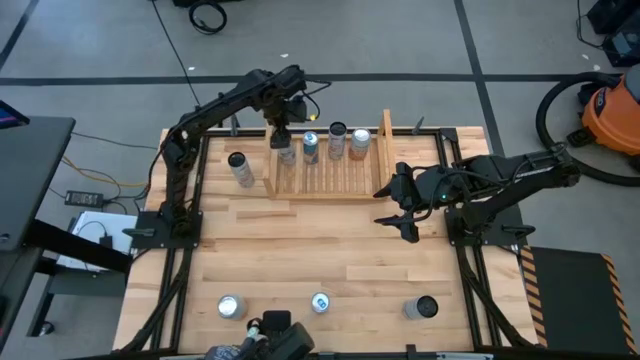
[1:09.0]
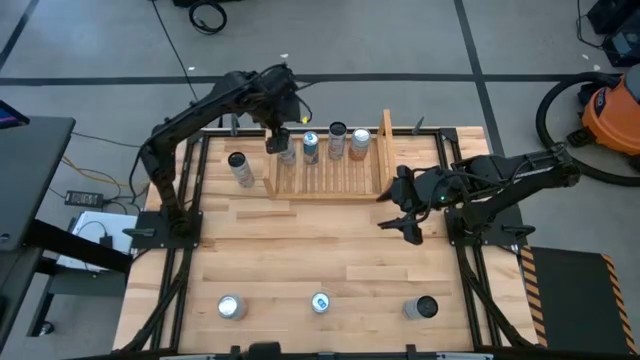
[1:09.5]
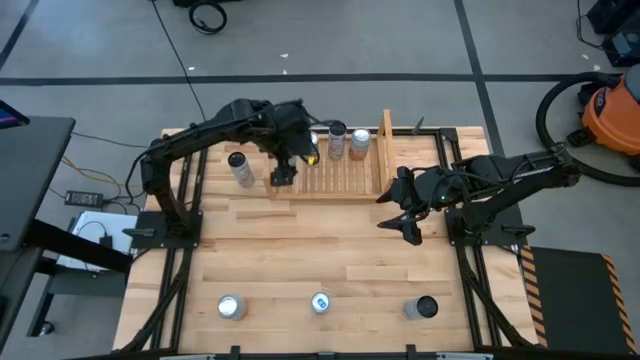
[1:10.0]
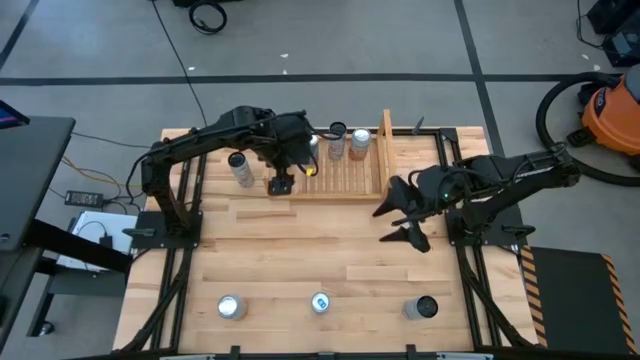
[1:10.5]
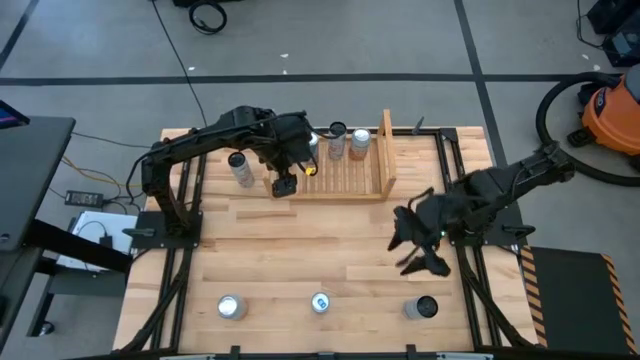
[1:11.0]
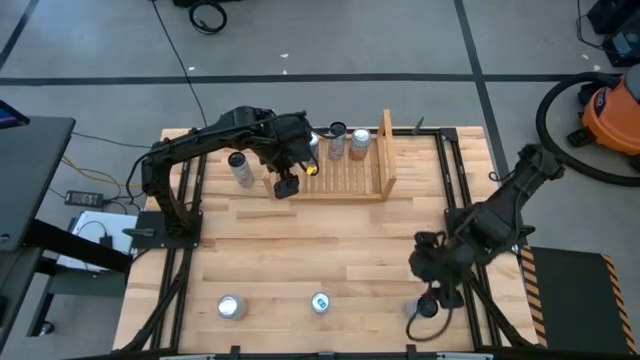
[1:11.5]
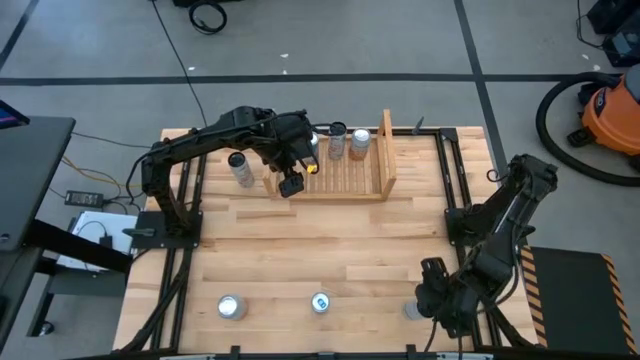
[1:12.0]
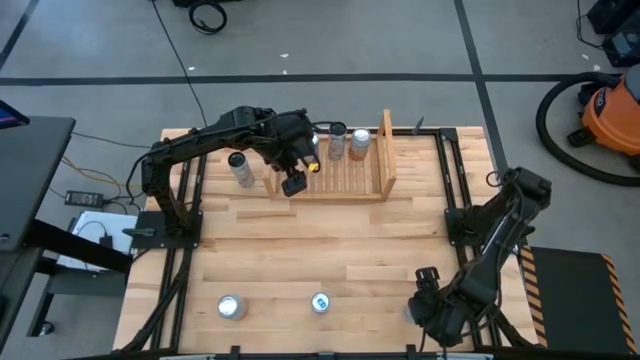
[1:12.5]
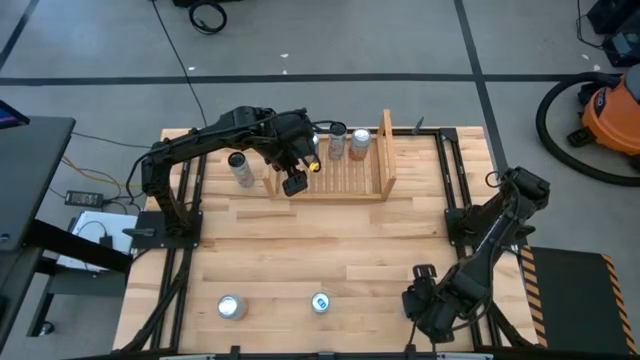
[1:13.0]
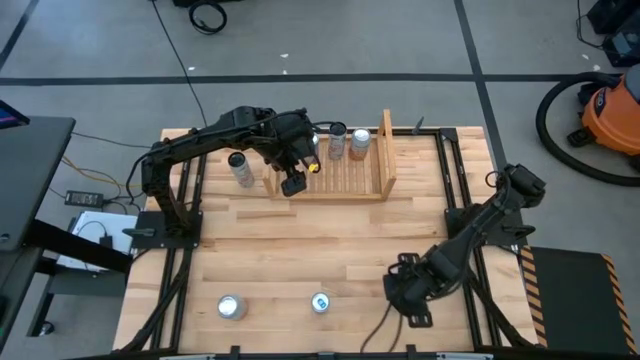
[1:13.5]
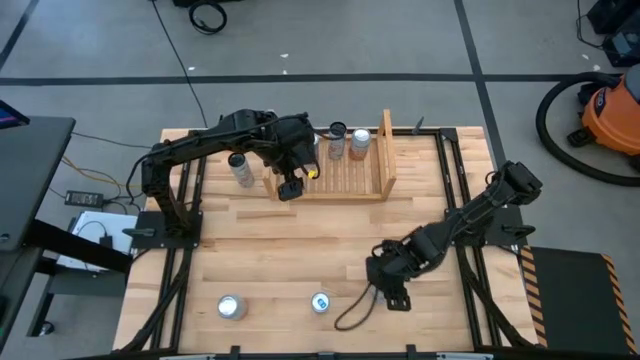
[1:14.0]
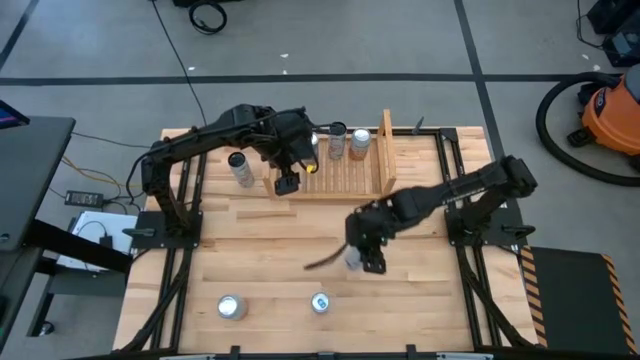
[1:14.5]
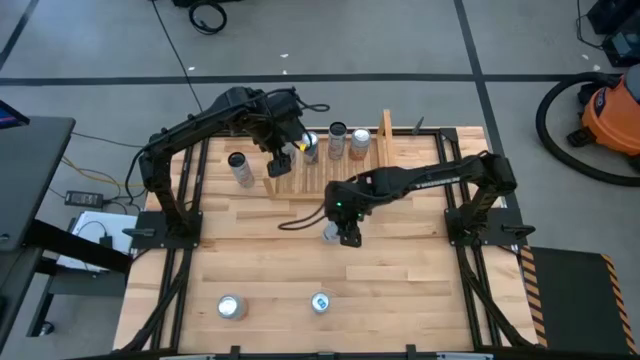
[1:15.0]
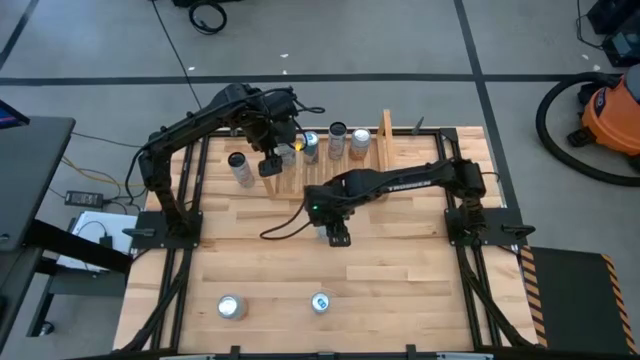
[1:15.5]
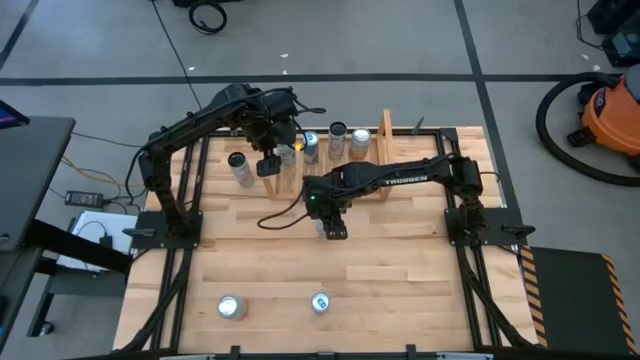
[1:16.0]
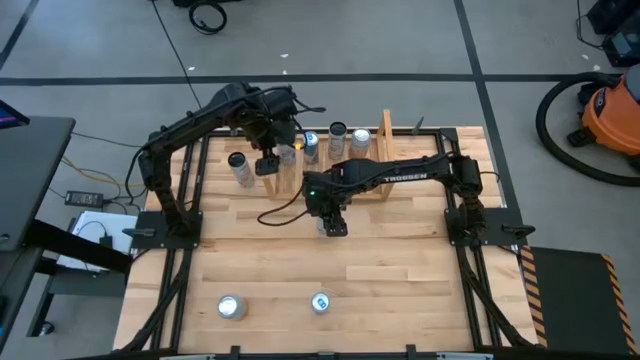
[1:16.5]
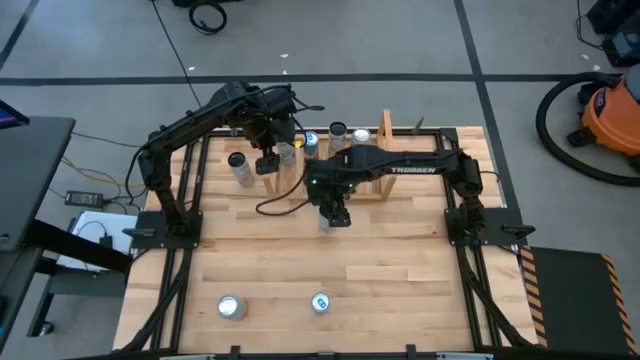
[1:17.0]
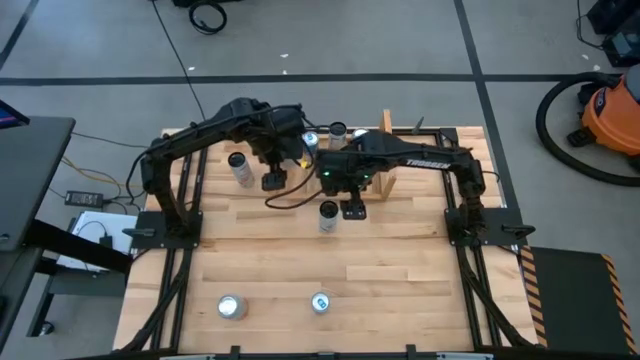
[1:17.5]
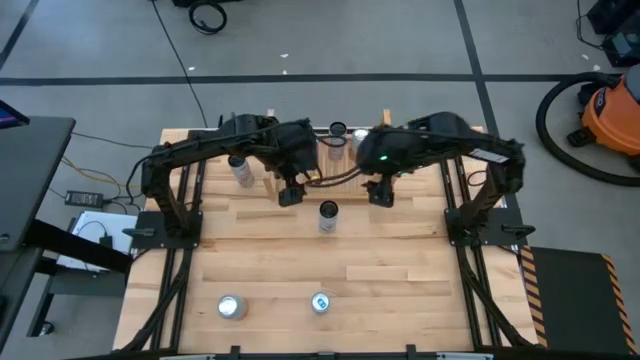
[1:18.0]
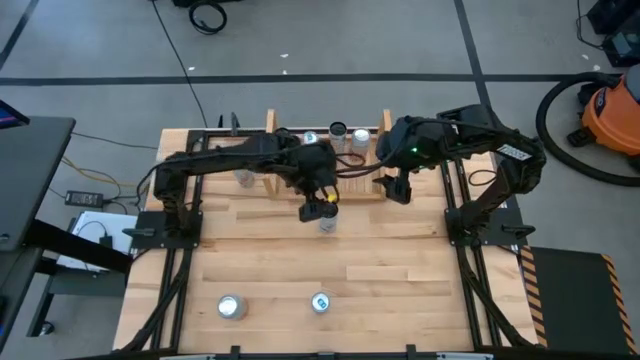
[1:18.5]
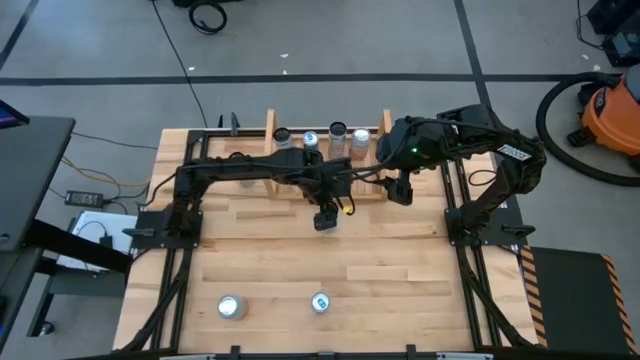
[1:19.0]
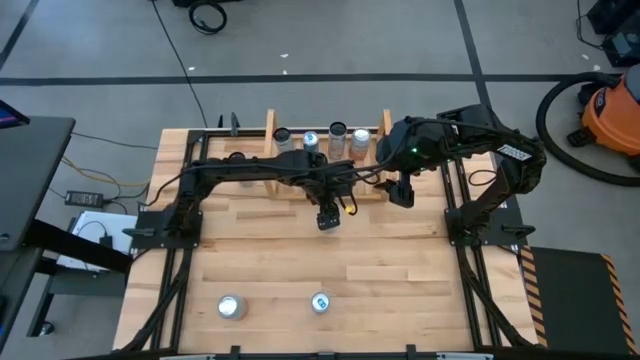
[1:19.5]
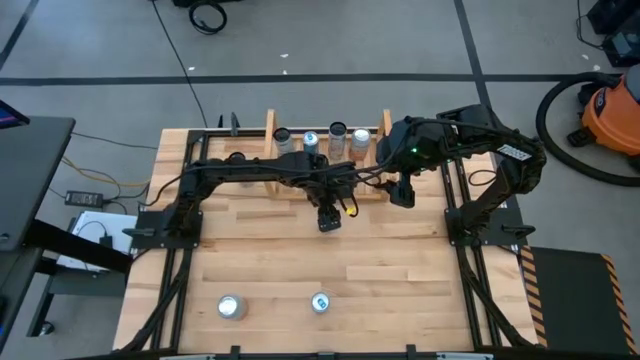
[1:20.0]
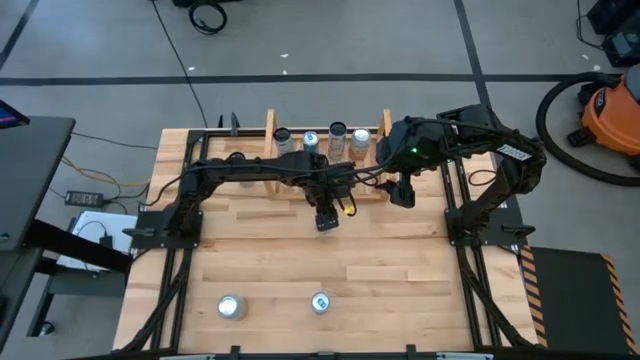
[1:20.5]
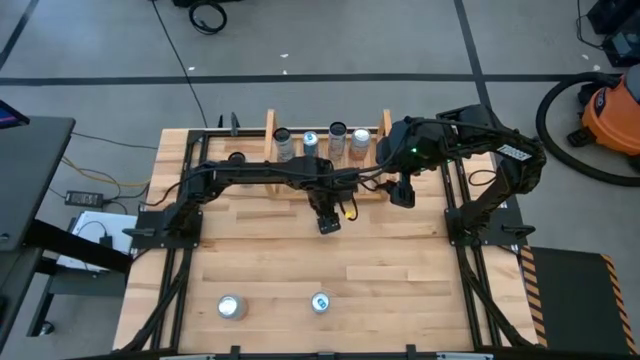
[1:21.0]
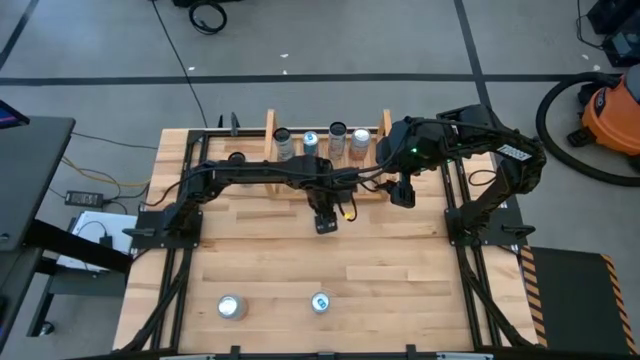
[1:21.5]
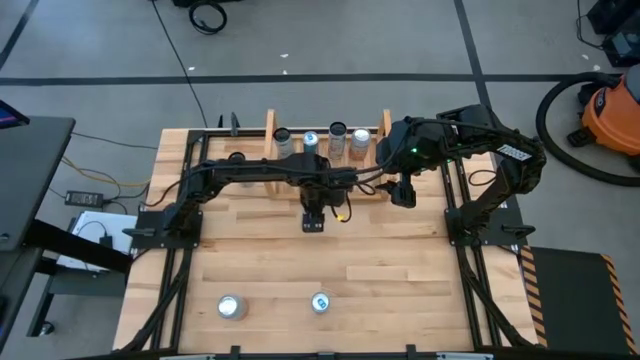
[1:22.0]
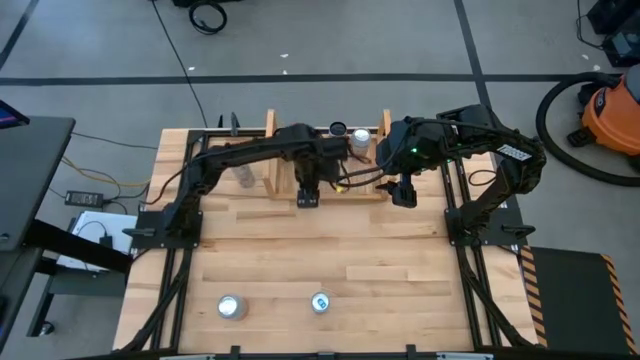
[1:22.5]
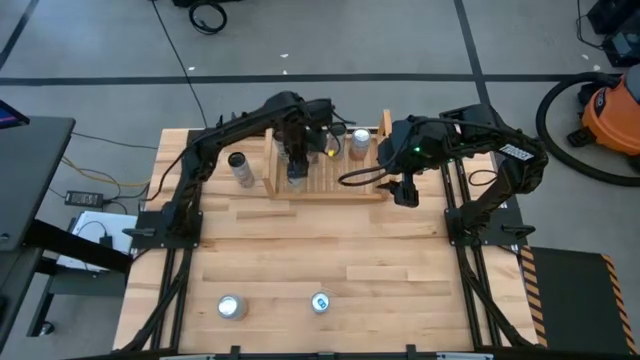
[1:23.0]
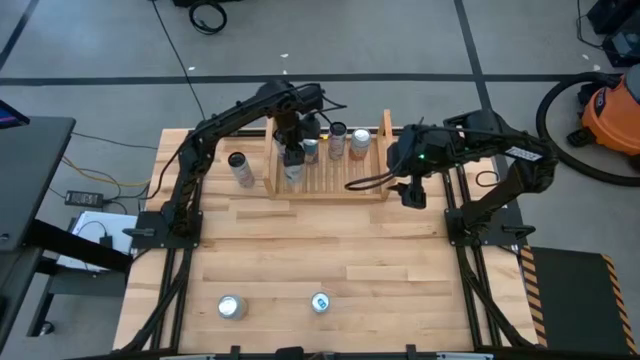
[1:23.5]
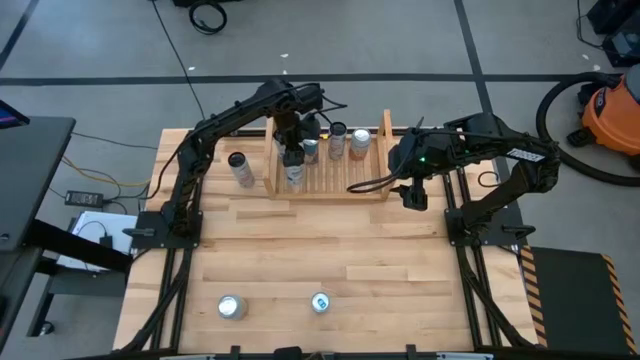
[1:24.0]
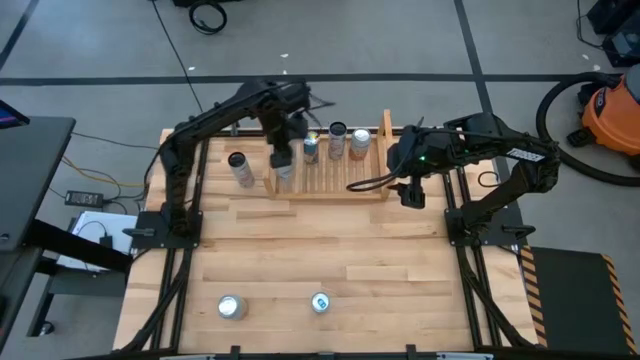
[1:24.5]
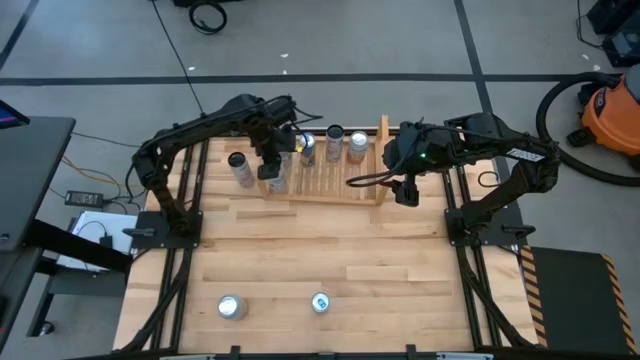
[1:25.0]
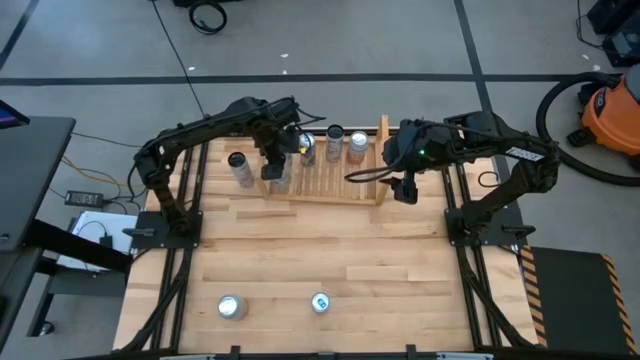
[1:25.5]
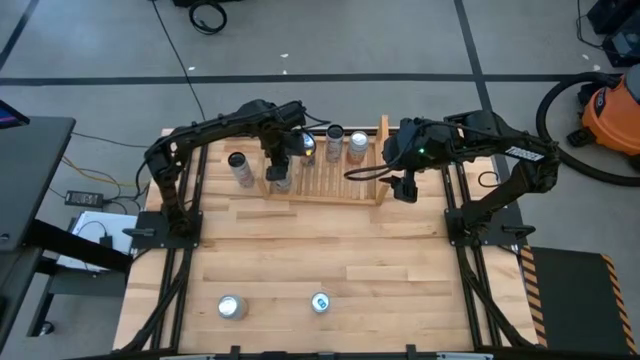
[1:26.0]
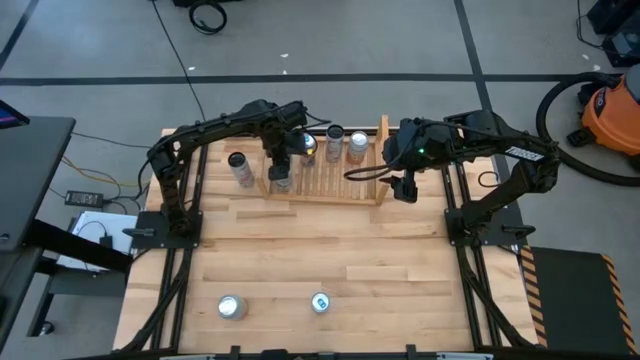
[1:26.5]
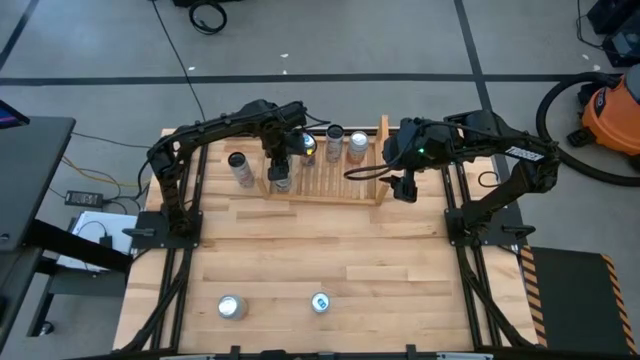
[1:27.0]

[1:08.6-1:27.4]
Task: Place canned beverage on shelf
Put the white-blue soda can on the shelf aligned with the other white-blue soda can

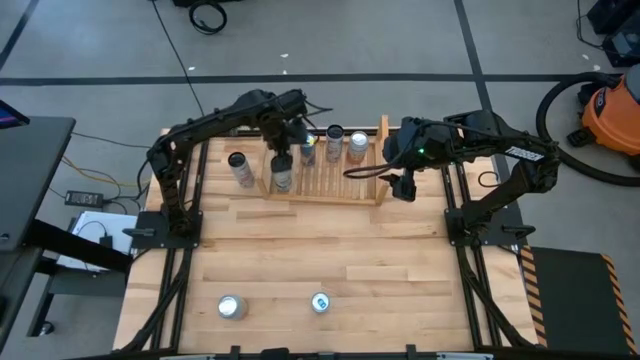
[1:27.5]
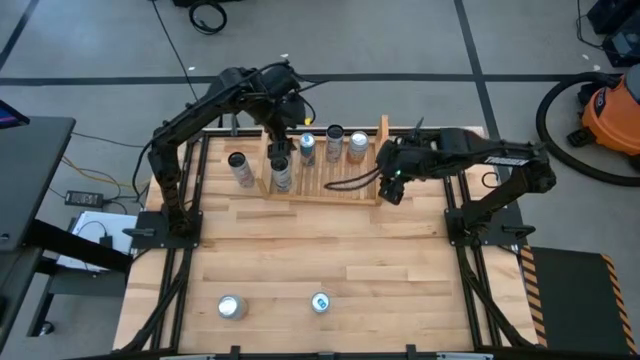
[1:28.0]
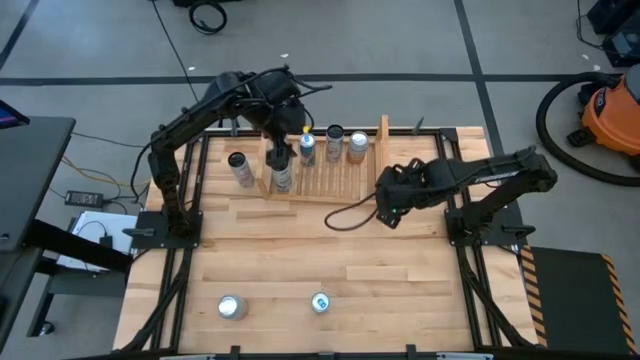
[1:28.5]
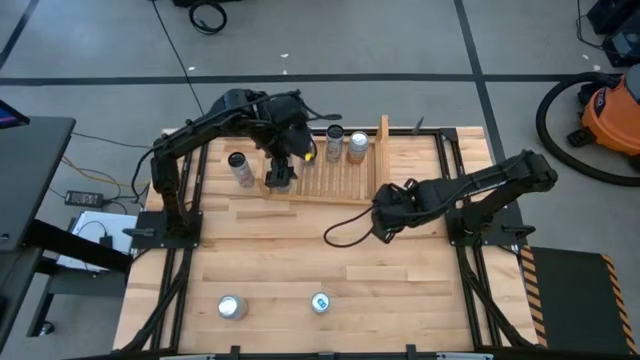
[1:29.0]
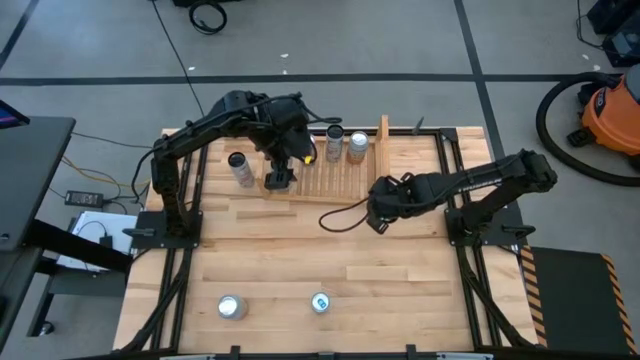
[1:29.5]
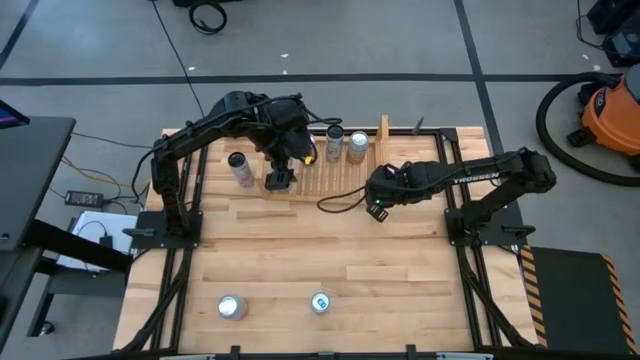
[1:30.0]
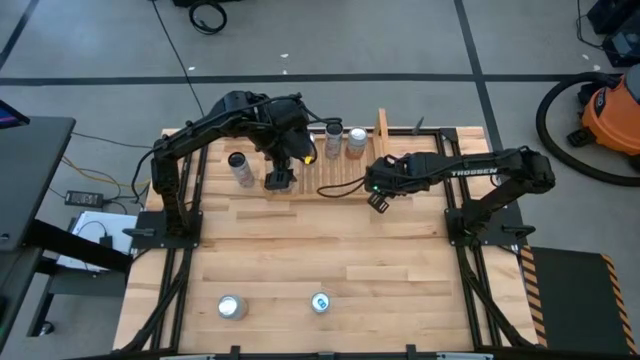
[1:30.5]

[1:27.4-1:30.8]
Adjust the shelf
